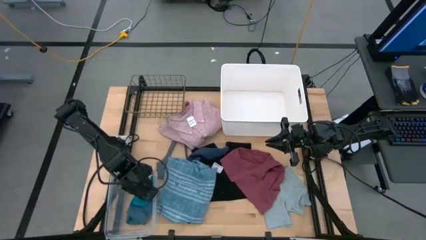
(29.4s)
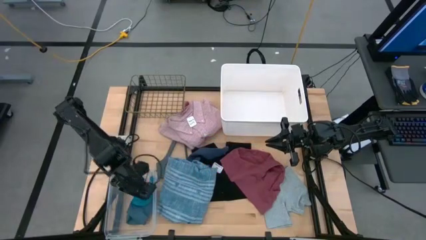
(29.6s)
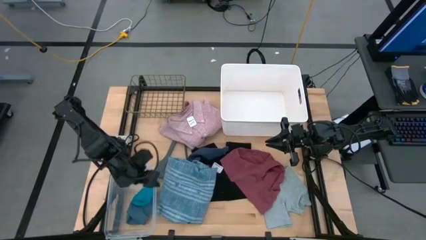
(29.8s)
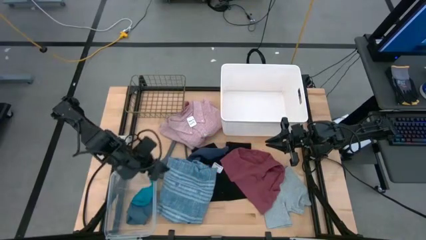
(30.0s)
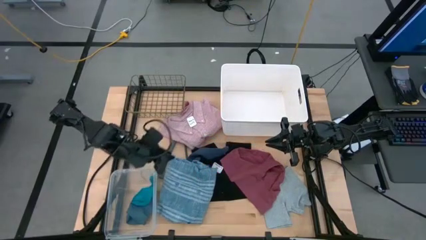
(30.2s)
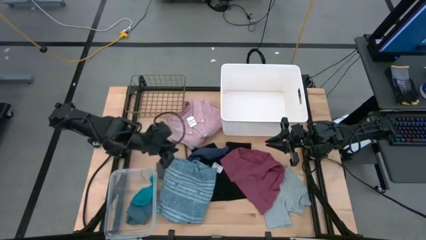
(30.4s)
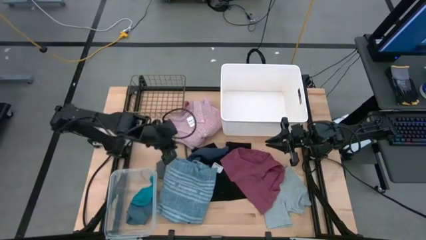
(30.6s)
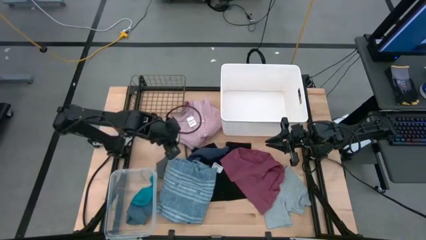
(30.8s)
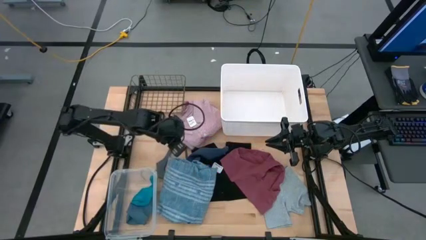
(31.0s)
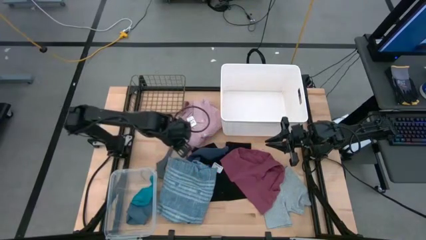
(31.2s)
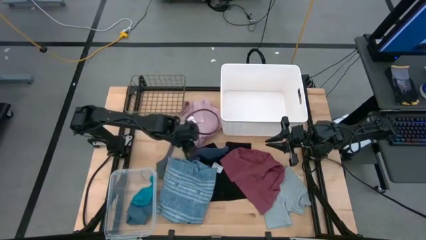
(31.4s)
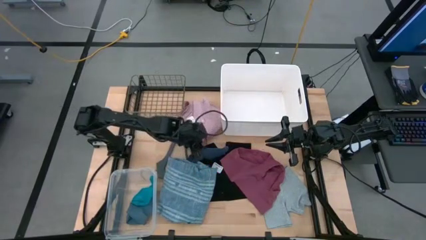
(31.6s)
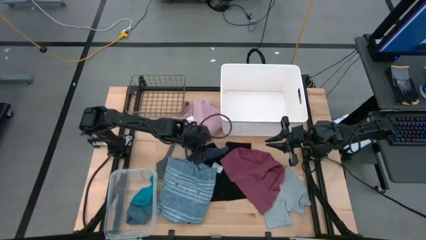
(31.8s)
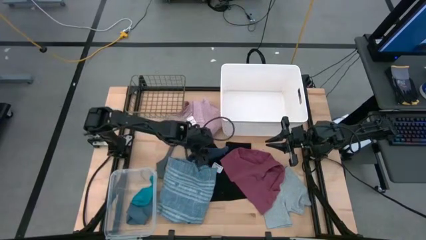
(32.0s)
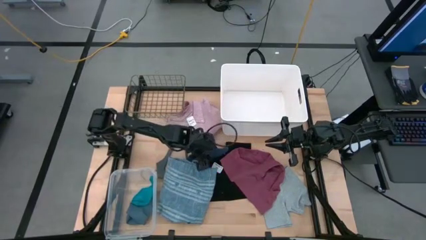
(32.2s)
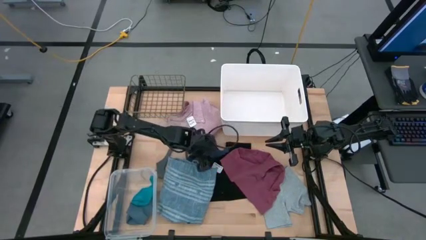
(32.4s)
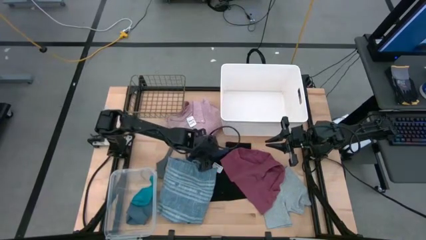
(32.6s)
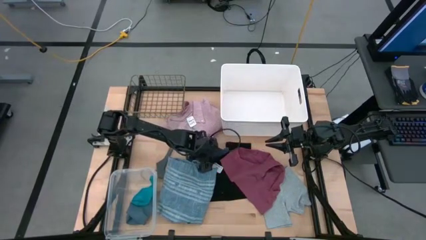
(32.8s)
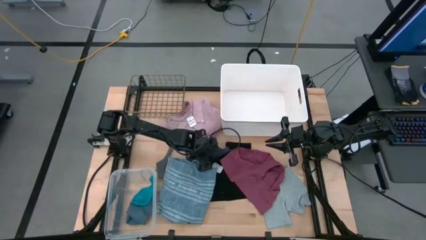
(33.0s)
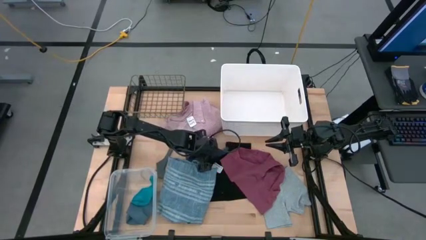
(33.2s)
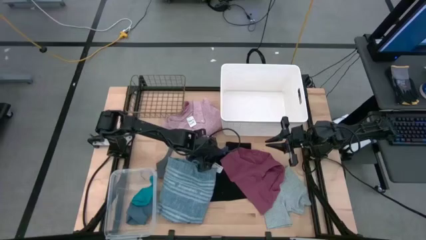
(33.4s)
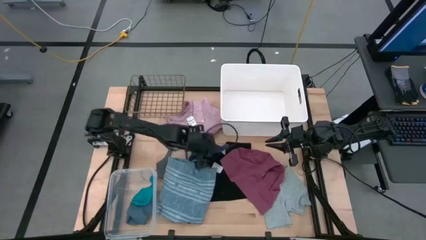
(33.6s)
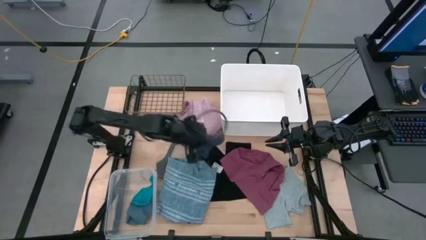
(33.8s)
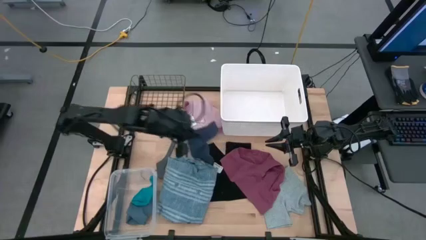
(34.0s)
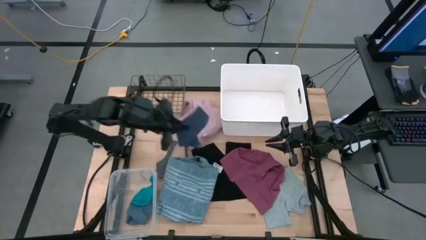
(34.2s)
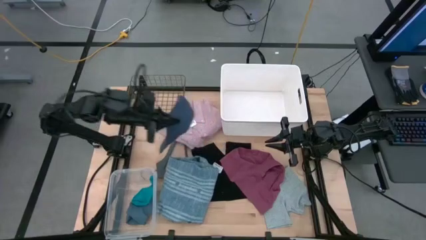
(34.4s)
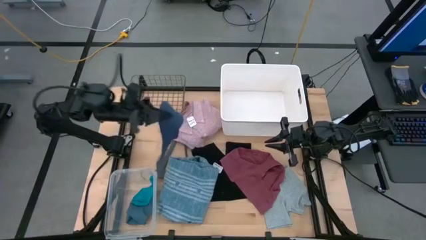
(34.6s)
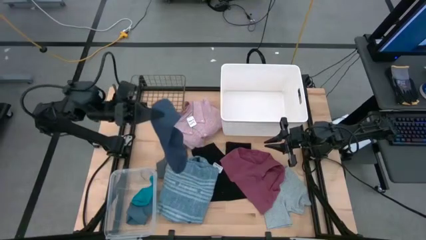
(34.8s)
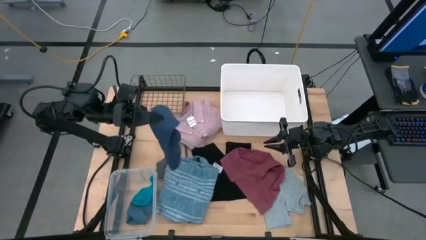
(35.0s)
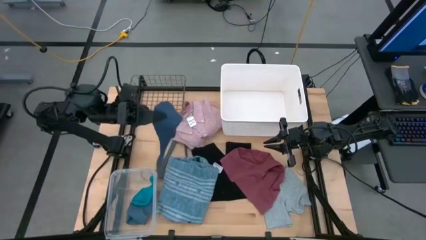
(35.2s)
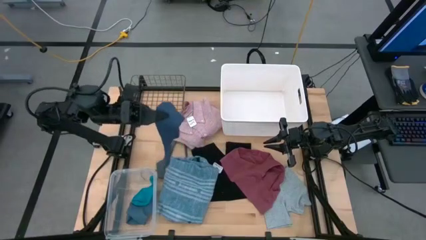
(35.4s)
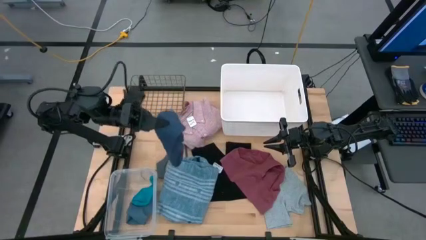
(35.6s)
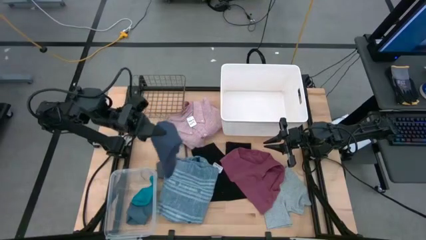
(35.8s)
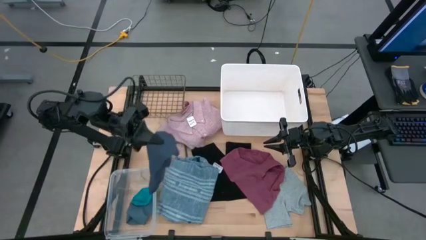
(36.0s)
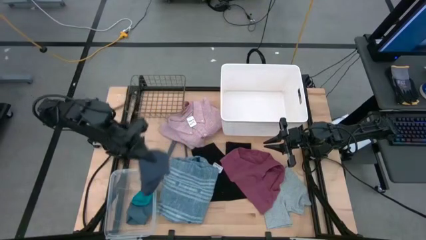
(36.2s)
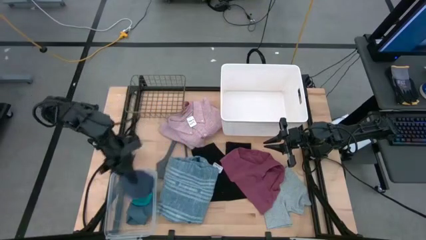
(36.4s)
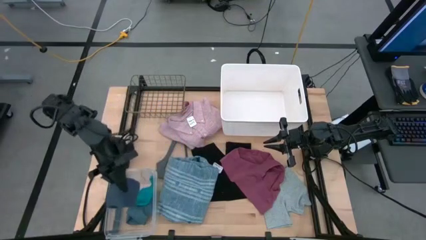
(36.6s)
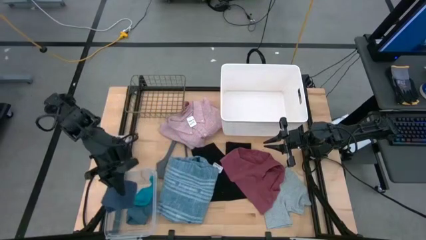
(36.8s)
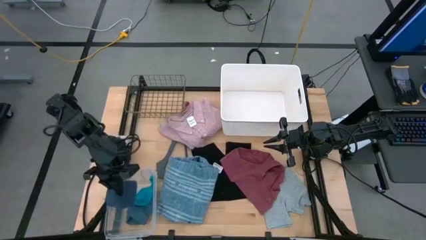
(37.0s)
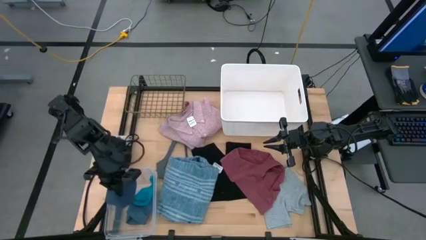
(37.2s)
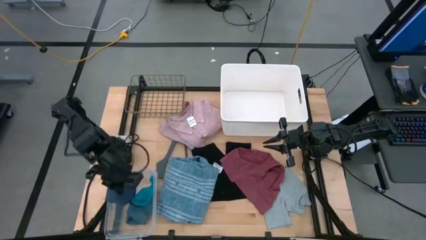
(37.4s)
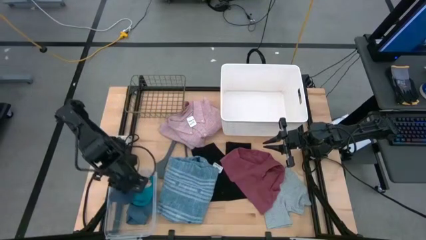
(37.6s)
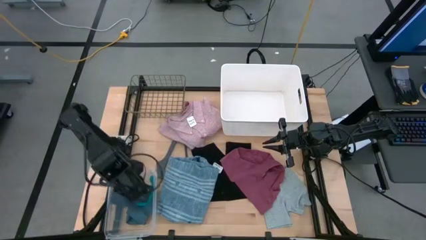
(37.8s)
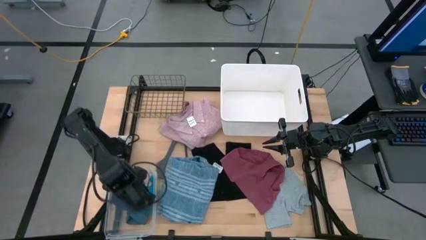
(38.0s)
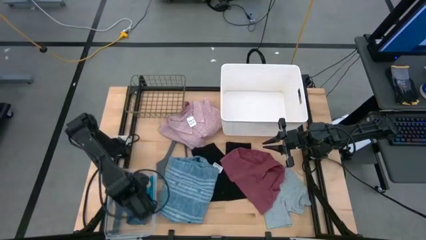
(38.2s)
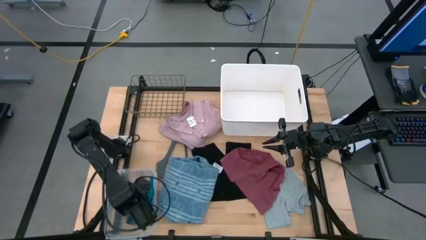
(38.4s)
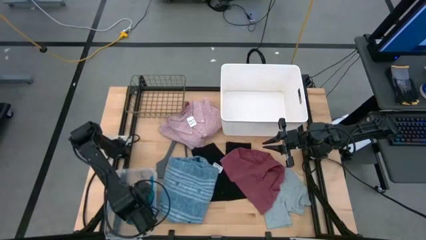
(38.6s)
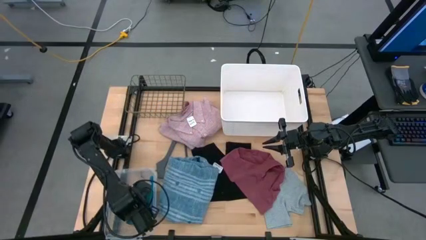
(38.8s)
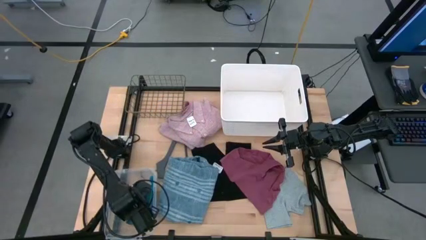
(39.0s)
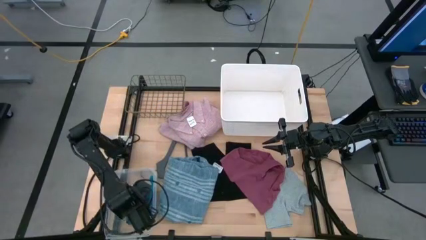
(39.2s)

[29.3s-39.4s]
Task: Pick & Place Cloths
Put the gray sock into the transparent bin
